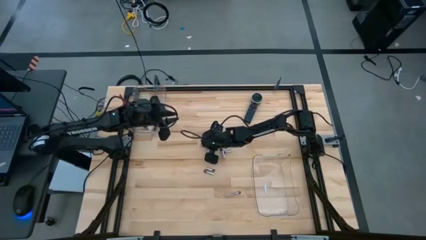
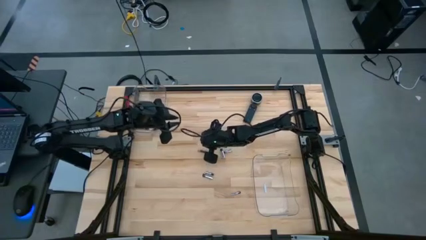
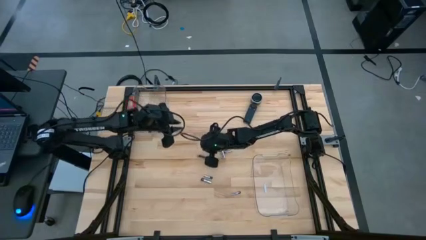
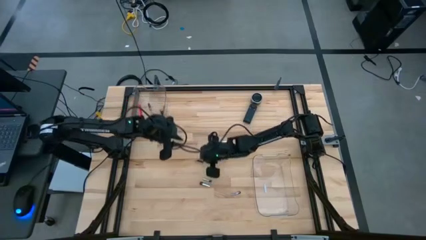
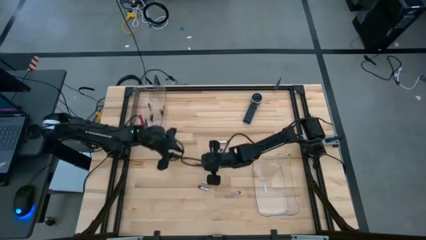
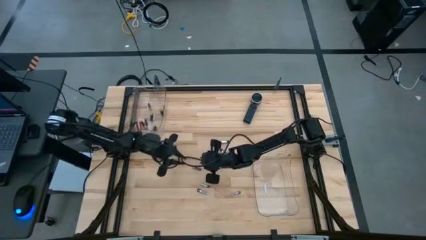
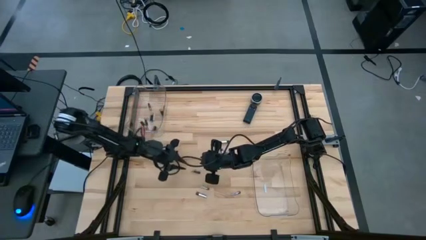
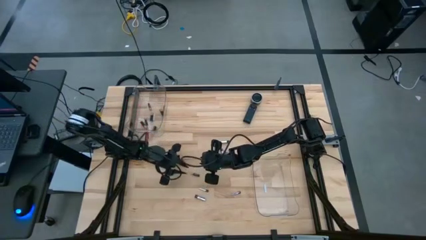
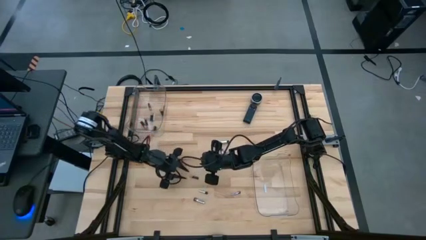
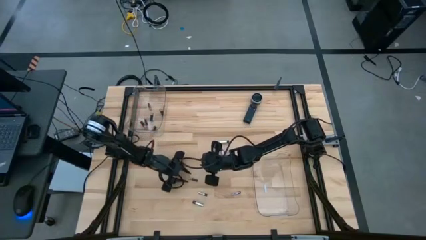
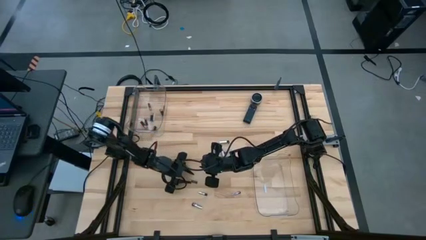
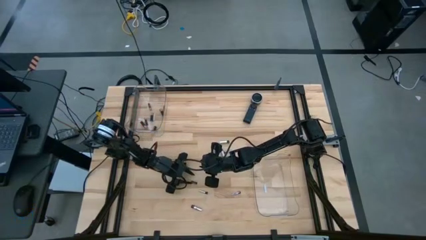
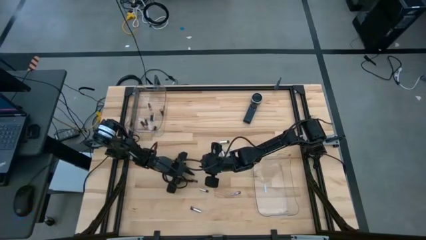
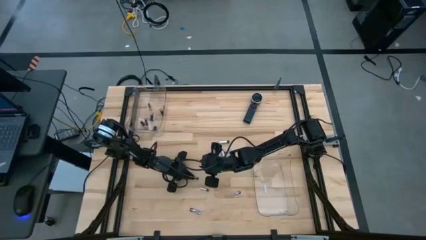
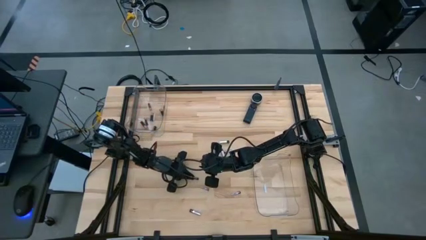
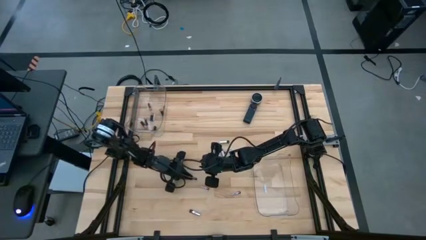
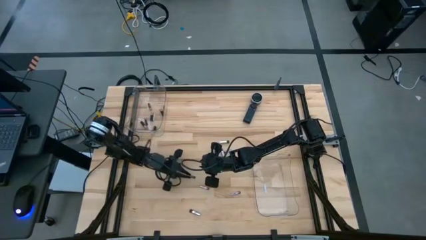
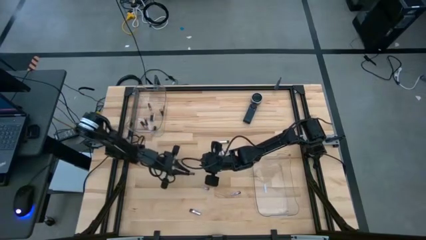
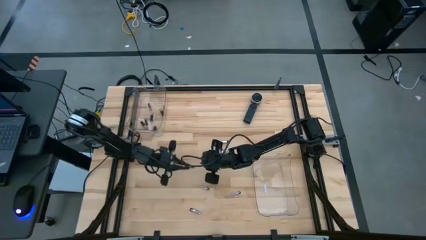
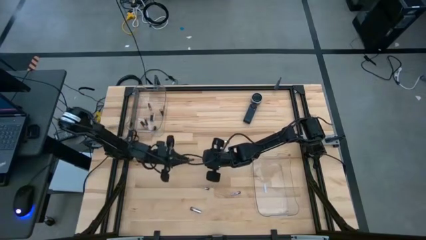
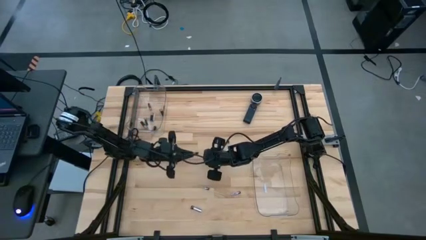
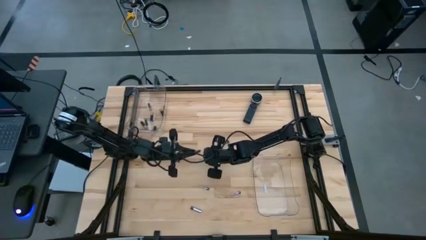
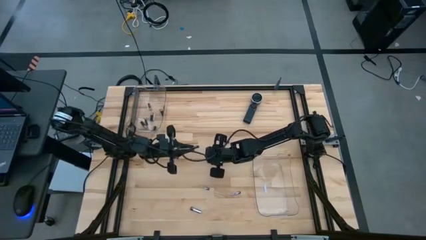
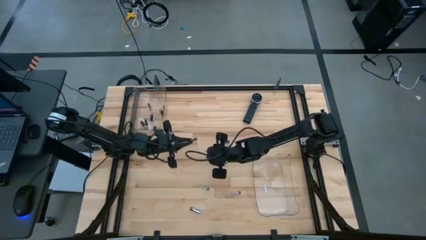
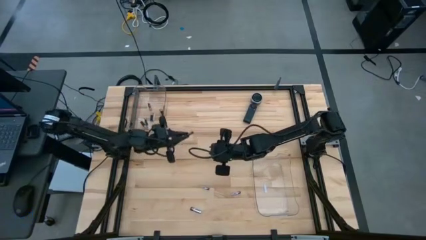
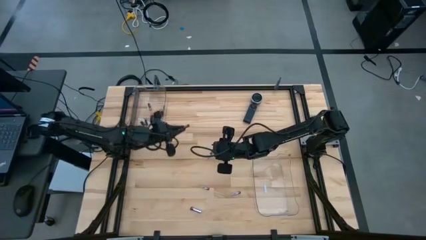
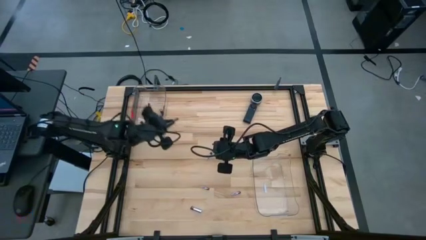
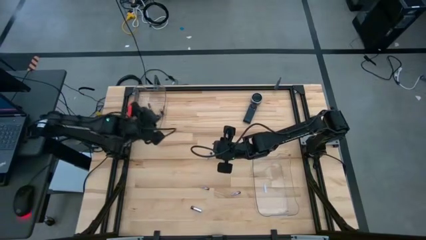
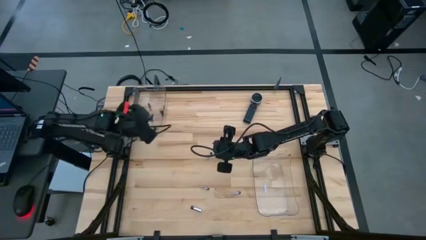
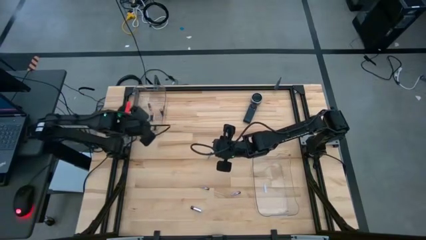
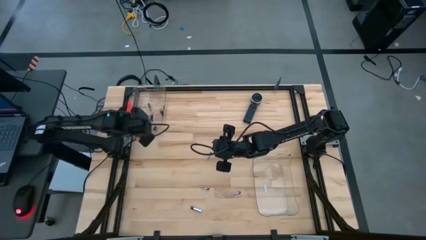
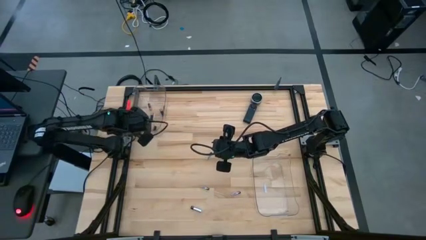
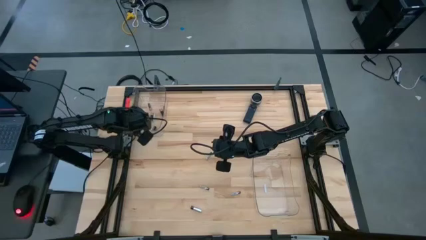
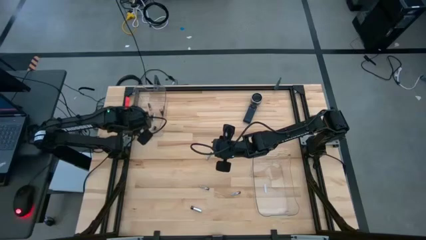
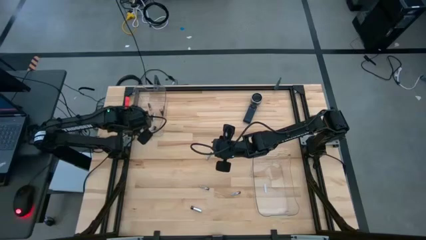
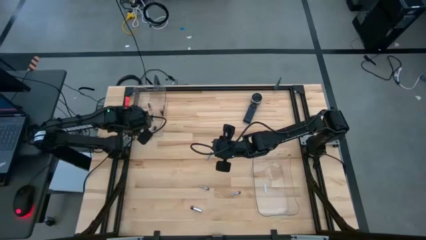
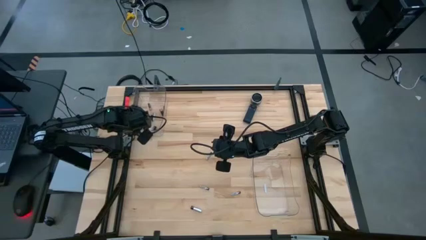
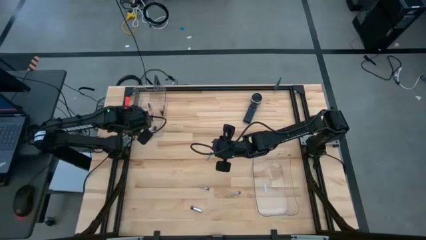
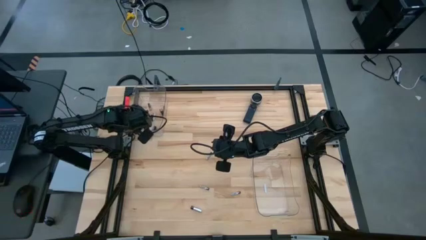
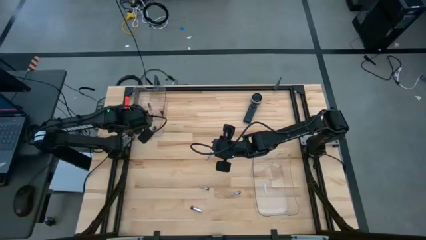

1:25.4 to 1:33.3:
Task: Sort batteries
Put the black battery into the top transparent bin

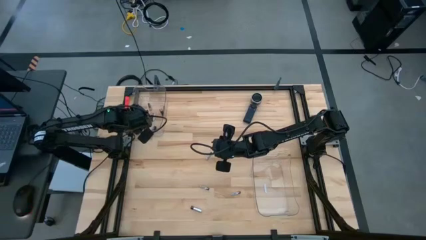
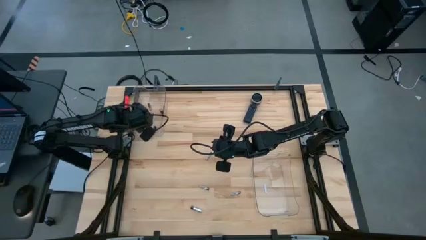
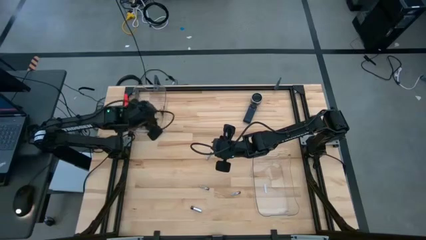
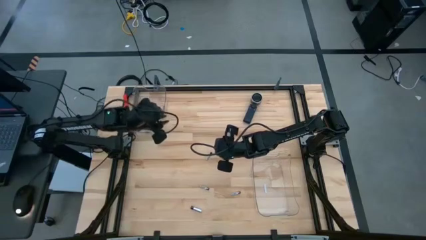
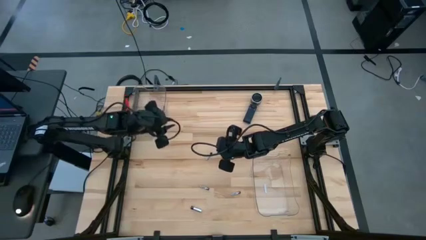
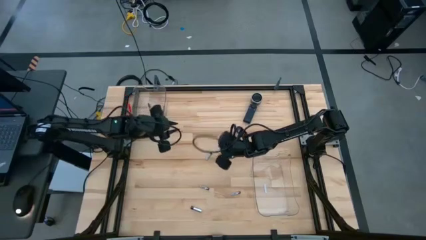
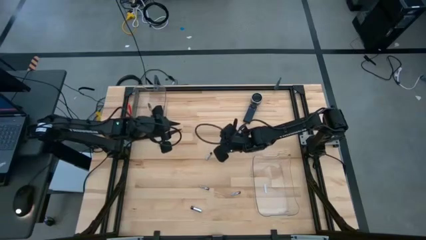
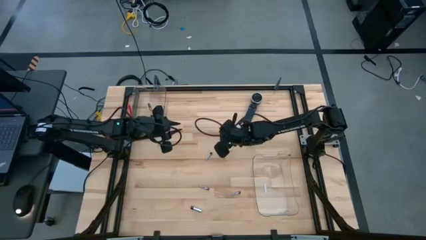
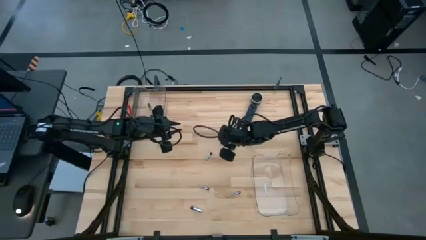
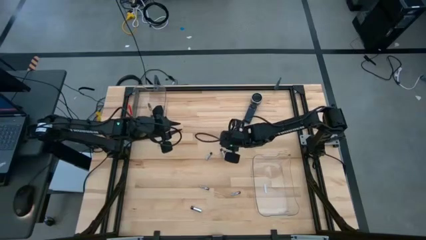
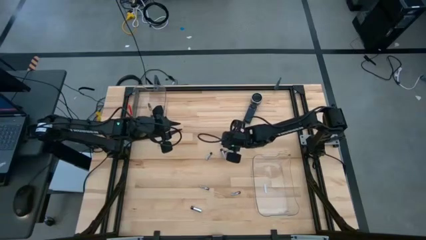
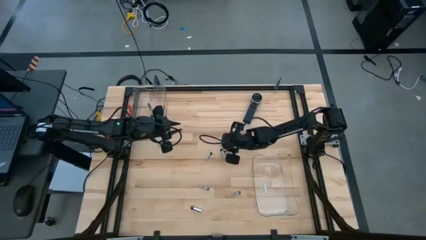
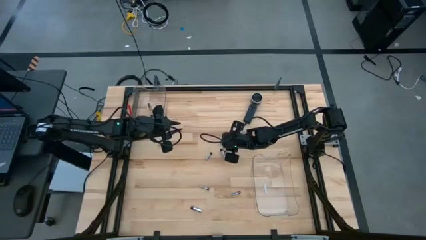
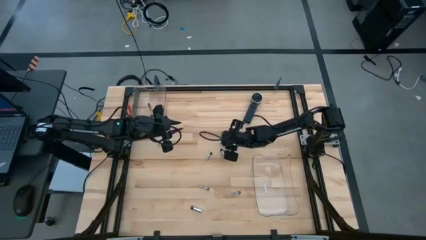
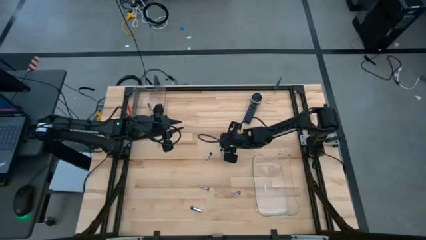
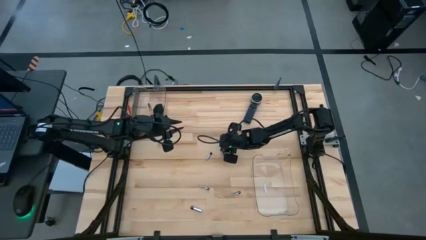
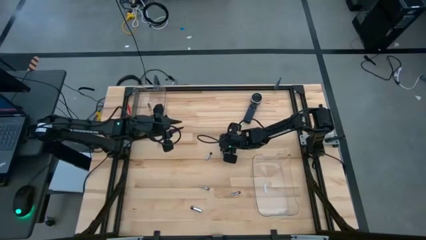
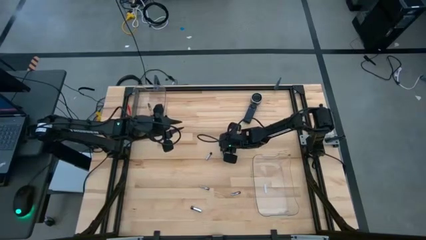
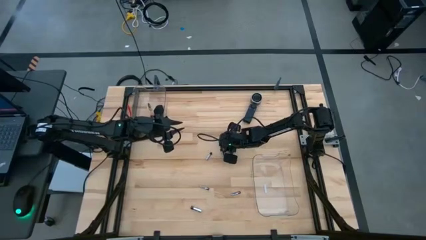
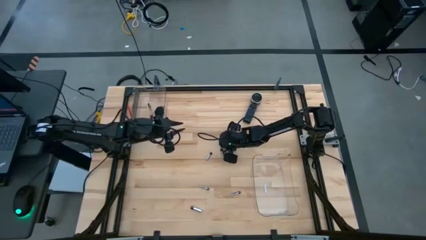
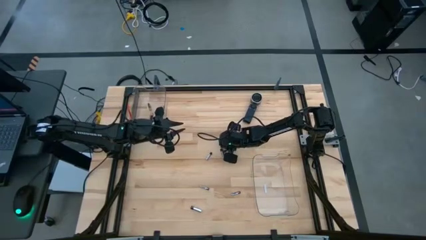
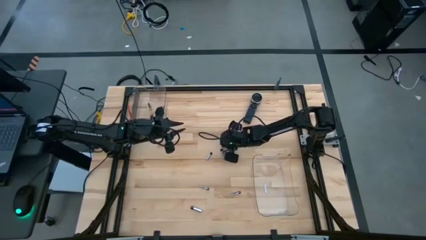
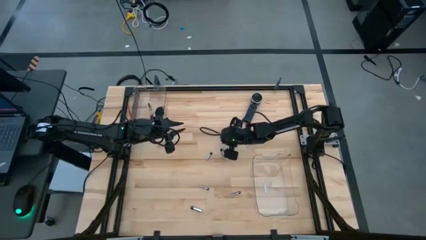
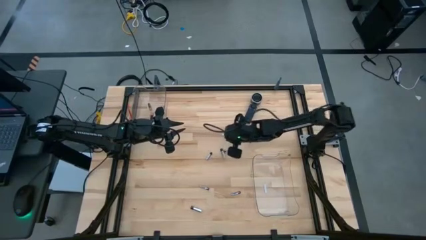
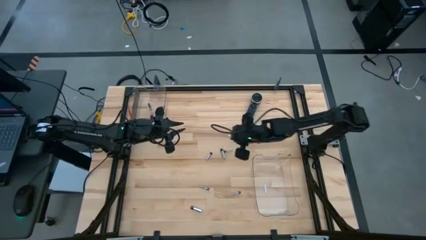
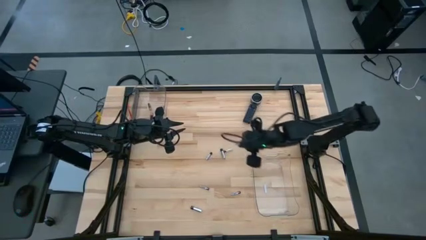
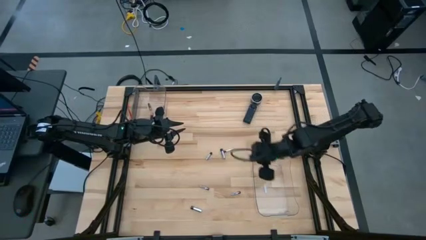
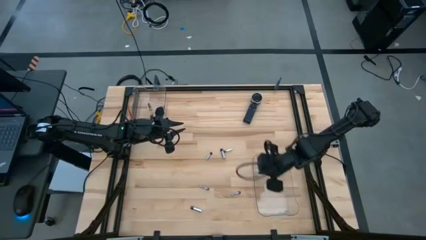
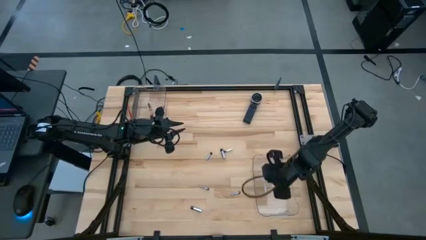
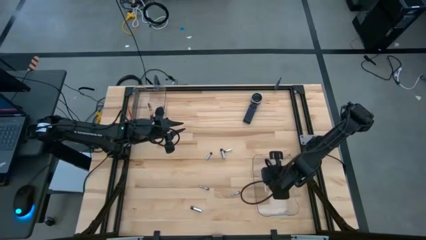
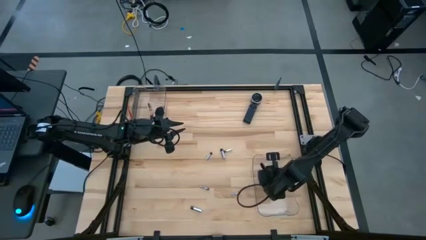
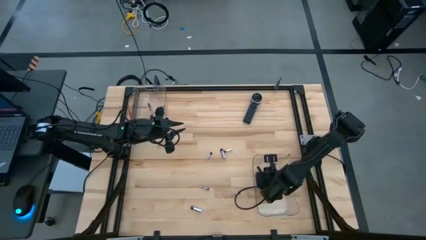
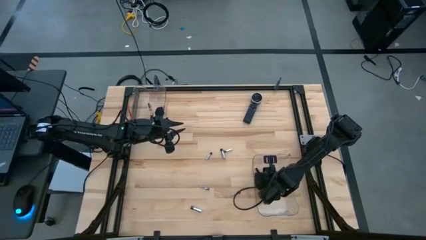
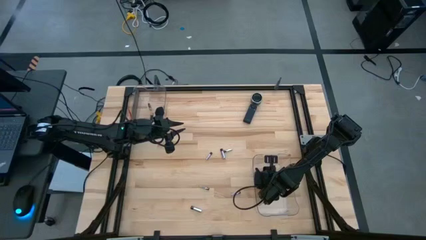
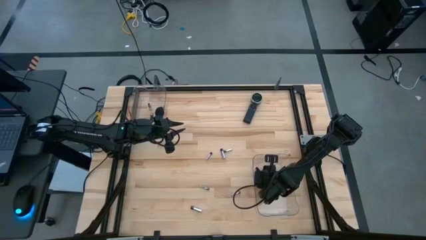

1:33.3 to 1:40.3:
Put the silver battery into the bottom transparent bin

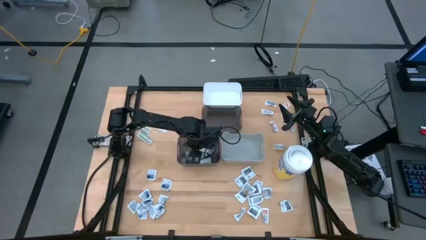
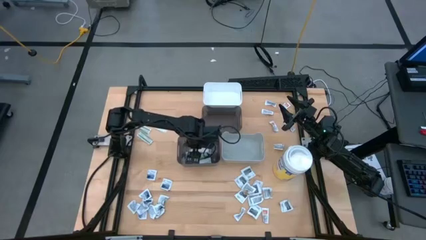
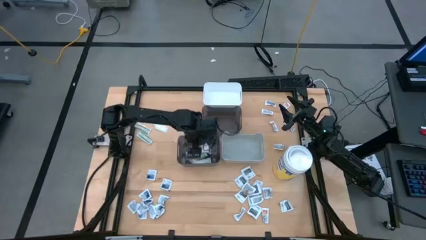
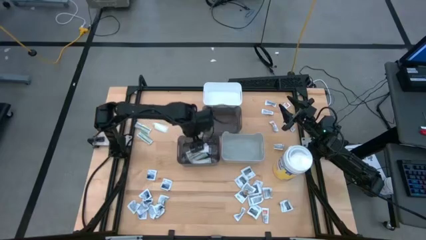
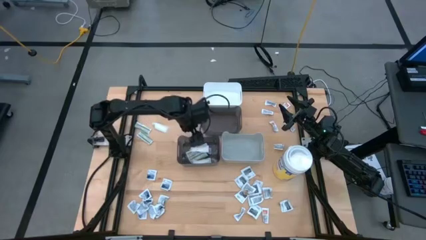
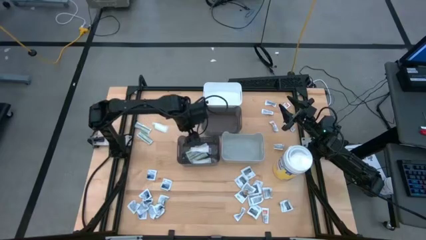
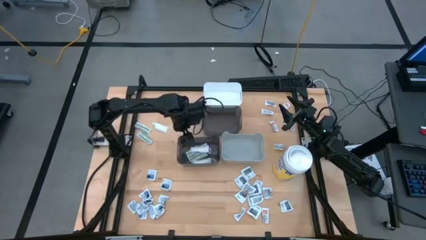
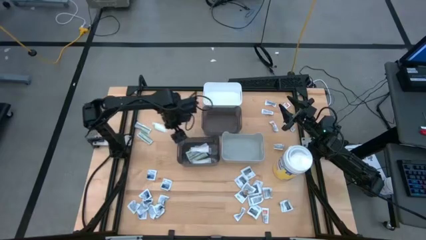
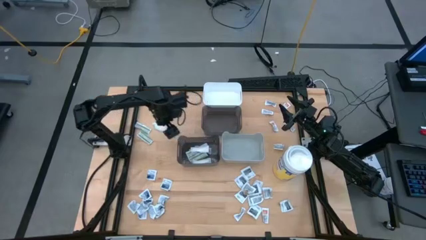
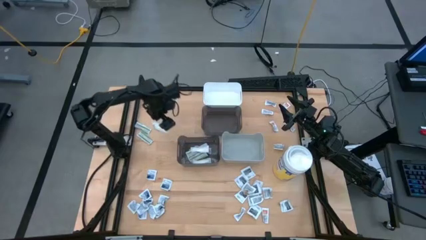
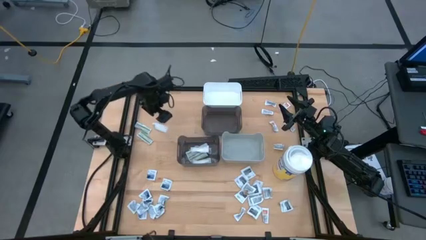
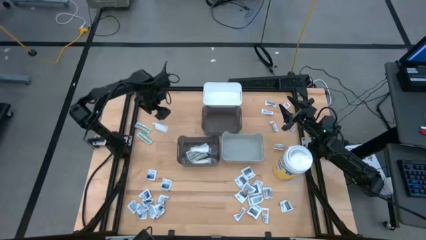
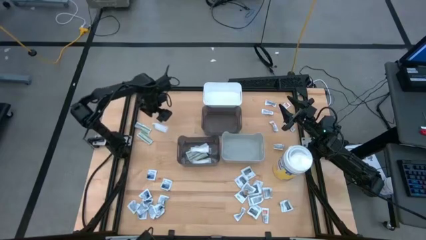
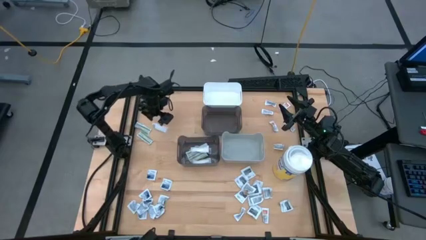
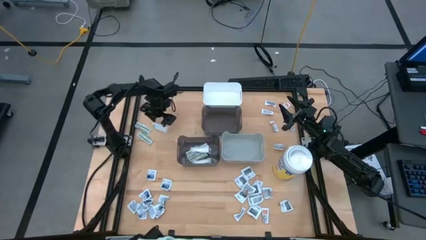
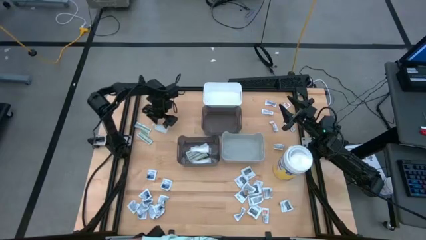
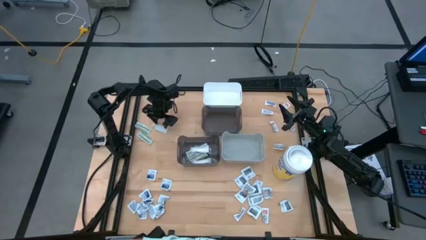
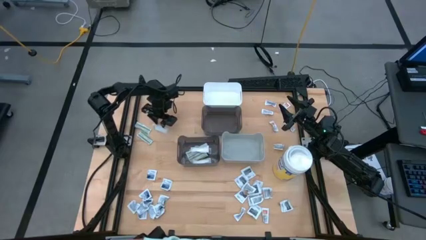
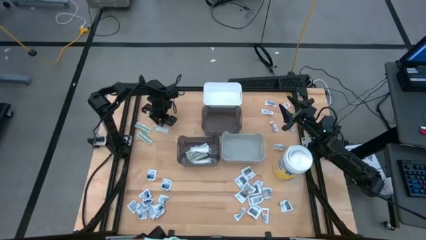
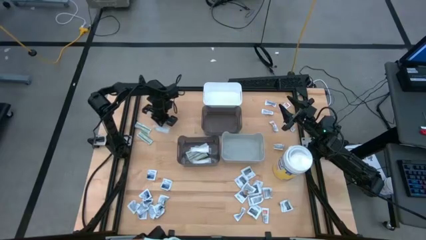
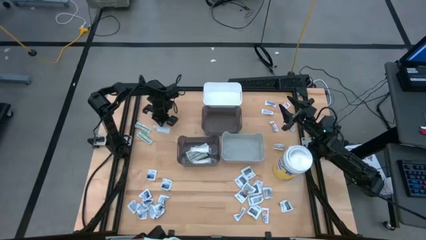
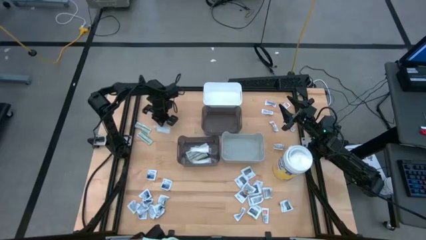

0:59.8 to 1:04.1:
Task: Pick & Place First Aid Supplies
Put the white bandage into the bottom black bin
